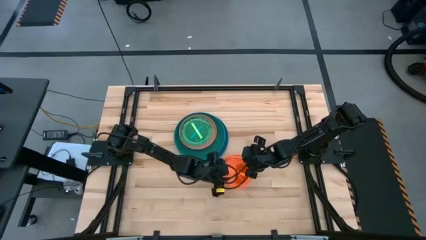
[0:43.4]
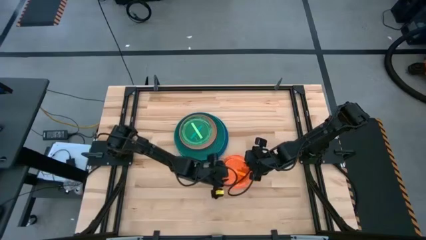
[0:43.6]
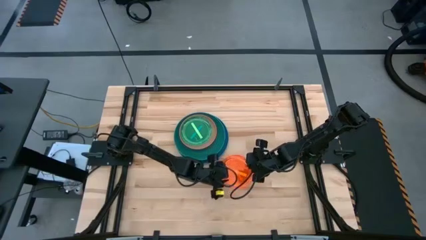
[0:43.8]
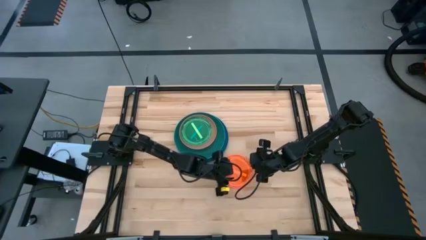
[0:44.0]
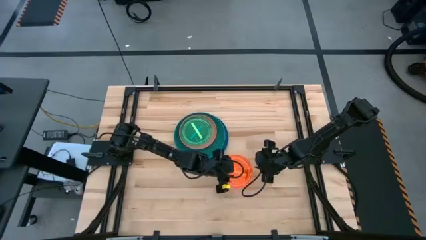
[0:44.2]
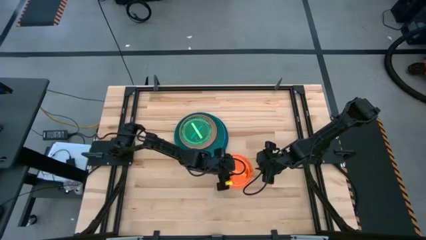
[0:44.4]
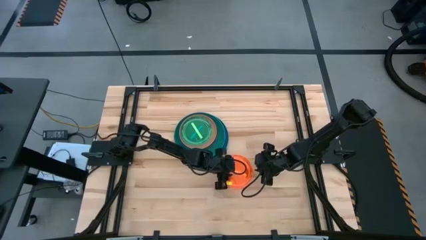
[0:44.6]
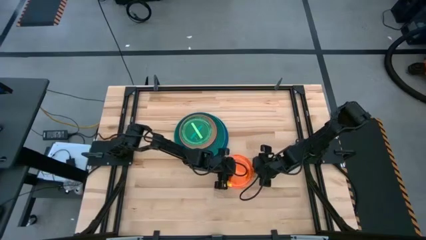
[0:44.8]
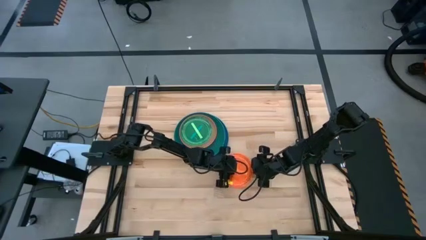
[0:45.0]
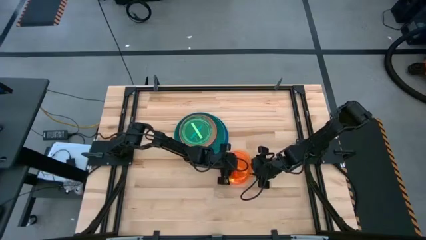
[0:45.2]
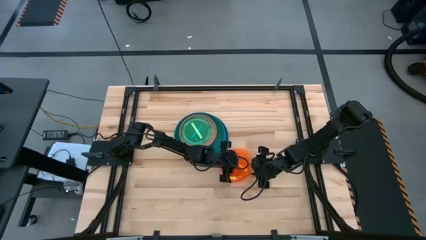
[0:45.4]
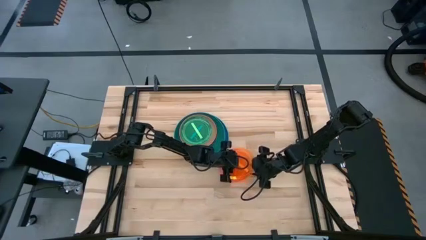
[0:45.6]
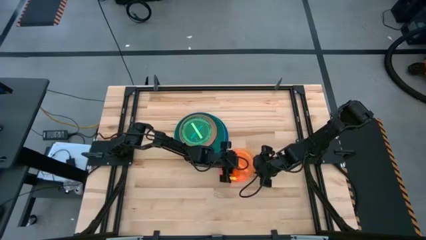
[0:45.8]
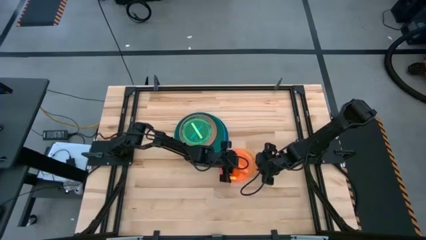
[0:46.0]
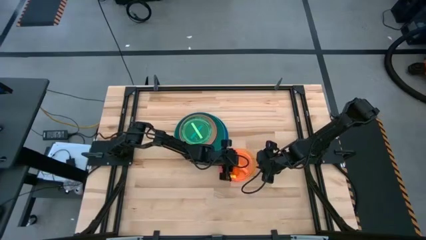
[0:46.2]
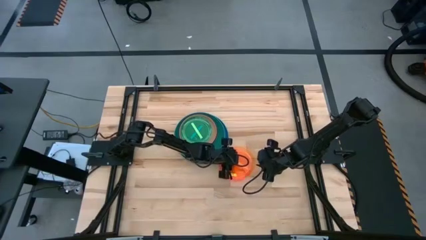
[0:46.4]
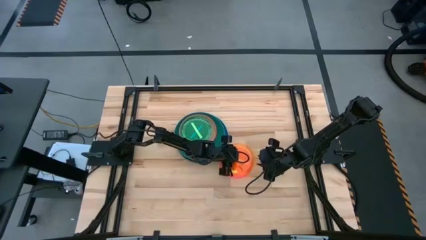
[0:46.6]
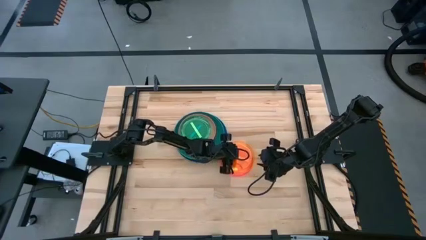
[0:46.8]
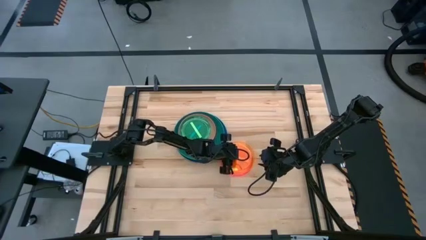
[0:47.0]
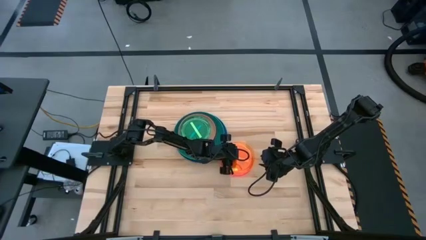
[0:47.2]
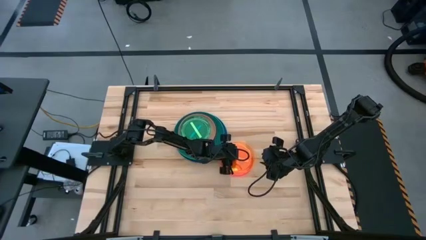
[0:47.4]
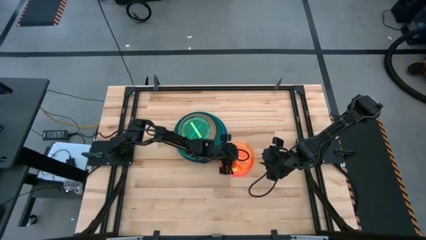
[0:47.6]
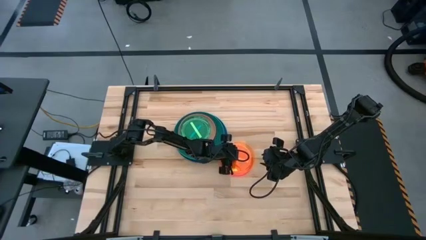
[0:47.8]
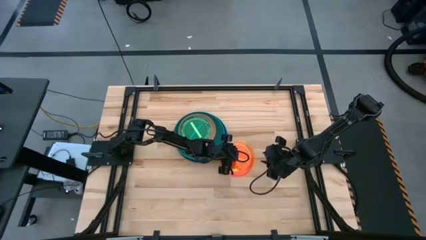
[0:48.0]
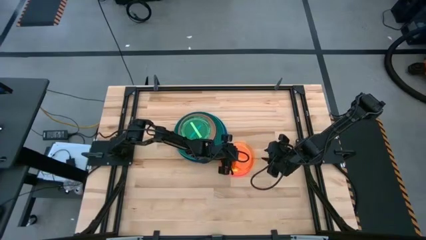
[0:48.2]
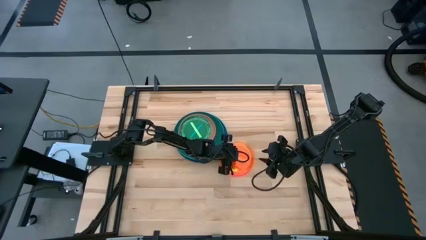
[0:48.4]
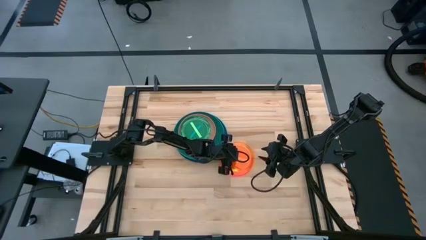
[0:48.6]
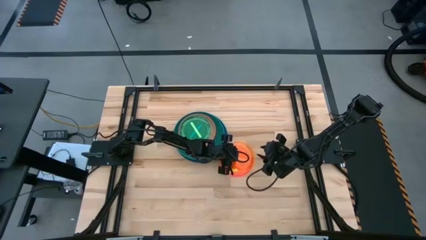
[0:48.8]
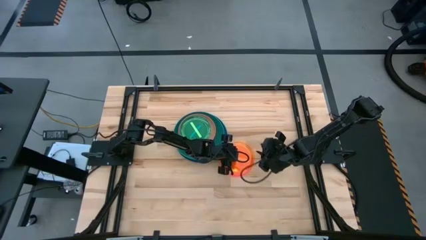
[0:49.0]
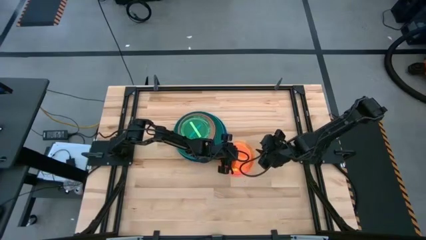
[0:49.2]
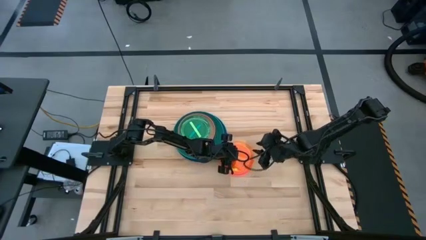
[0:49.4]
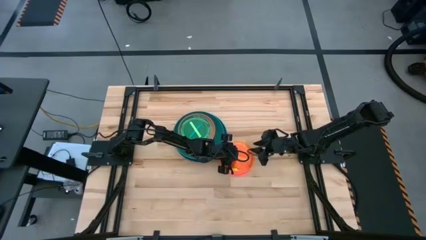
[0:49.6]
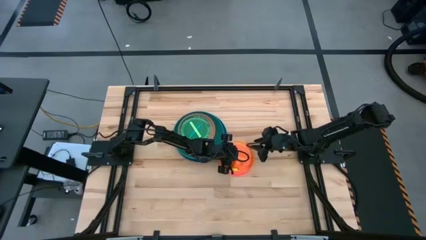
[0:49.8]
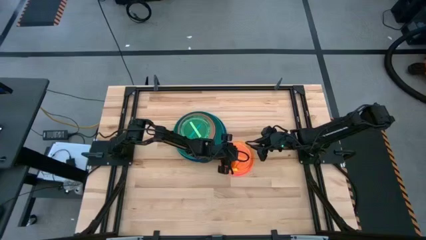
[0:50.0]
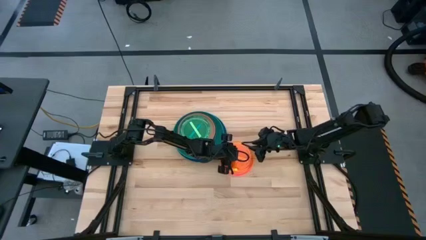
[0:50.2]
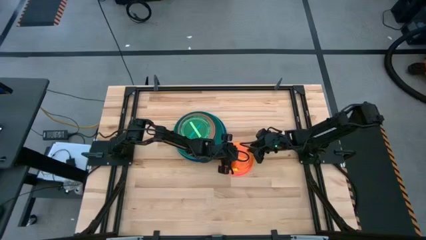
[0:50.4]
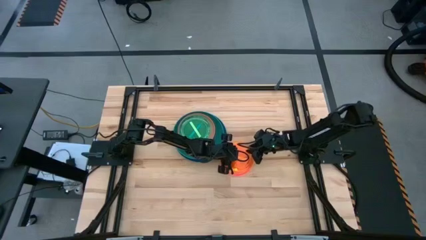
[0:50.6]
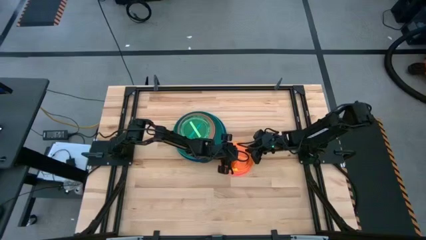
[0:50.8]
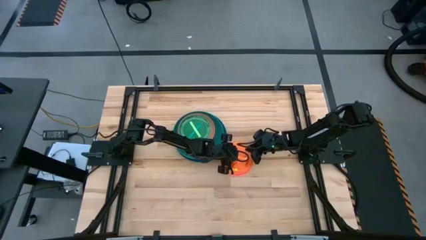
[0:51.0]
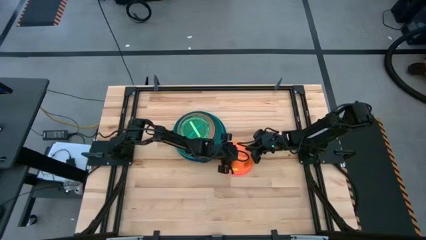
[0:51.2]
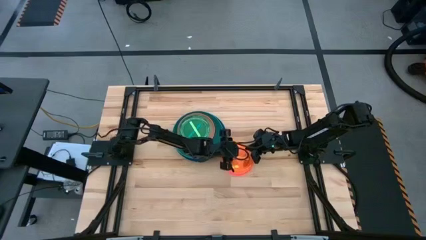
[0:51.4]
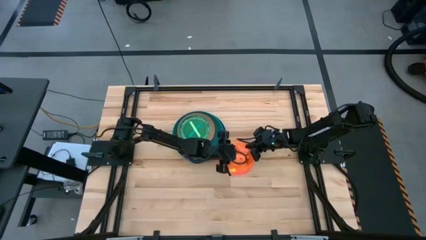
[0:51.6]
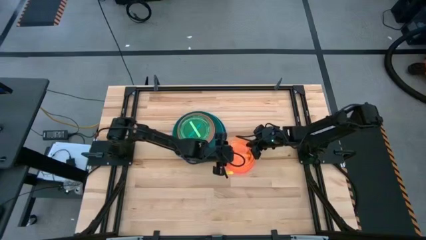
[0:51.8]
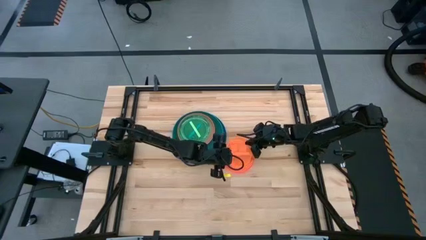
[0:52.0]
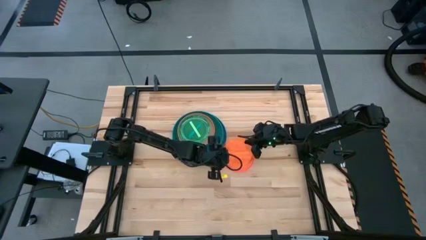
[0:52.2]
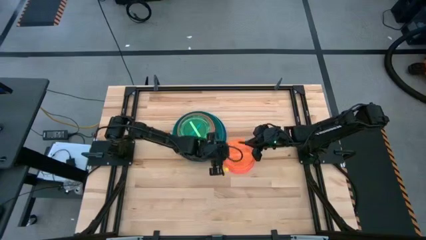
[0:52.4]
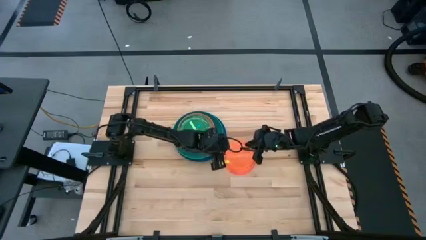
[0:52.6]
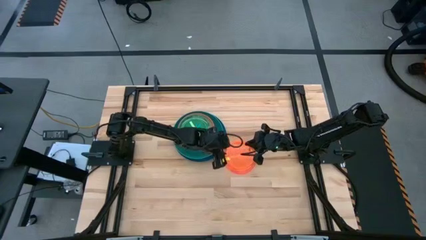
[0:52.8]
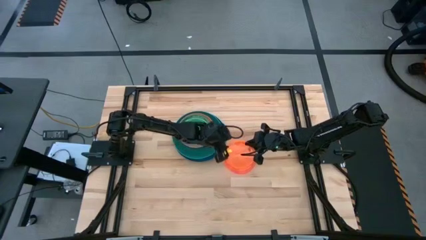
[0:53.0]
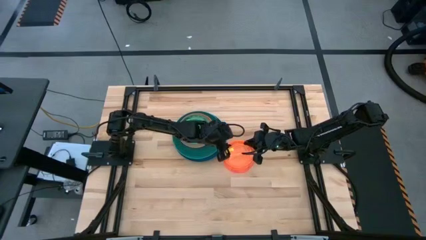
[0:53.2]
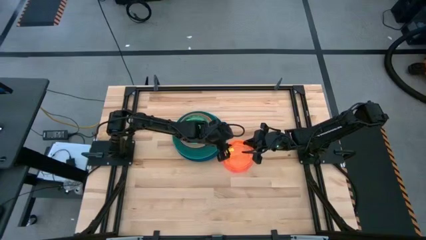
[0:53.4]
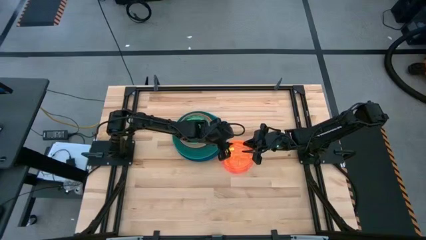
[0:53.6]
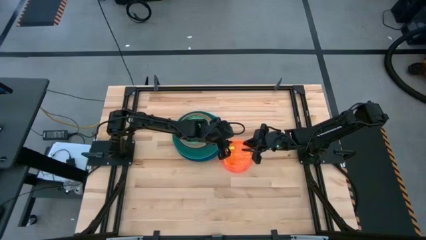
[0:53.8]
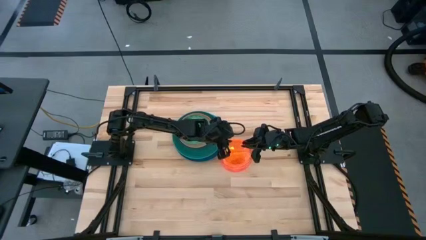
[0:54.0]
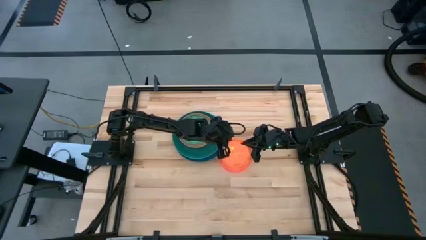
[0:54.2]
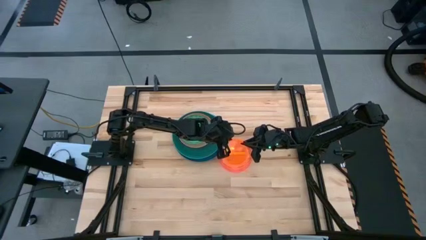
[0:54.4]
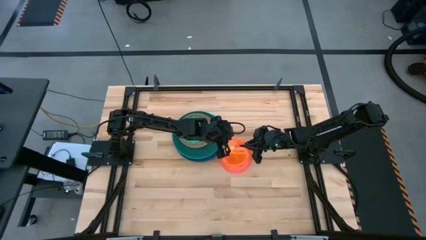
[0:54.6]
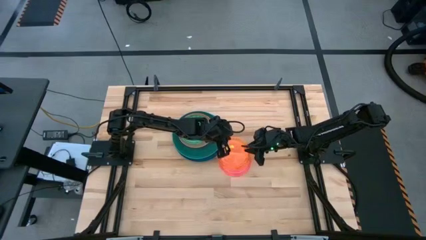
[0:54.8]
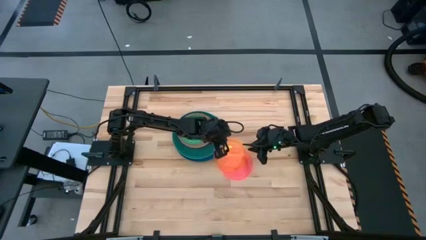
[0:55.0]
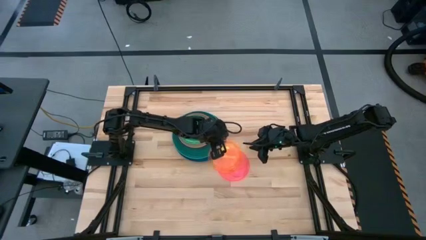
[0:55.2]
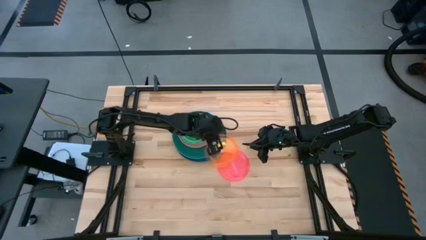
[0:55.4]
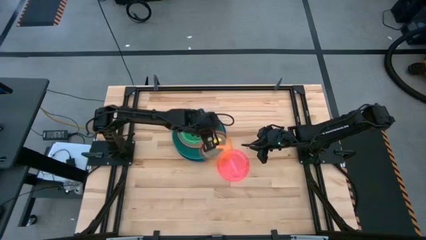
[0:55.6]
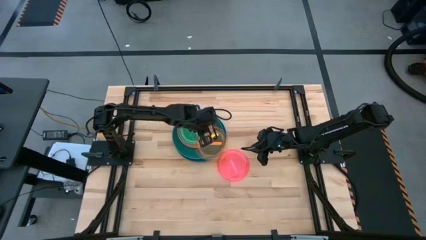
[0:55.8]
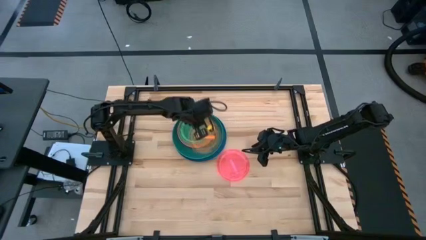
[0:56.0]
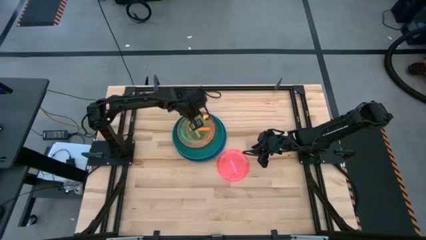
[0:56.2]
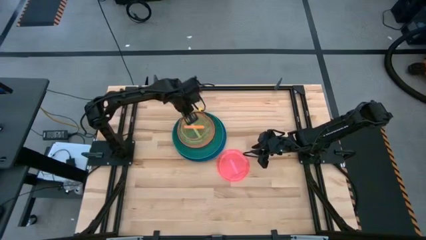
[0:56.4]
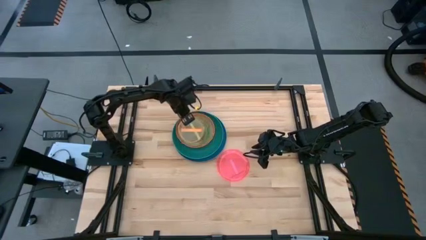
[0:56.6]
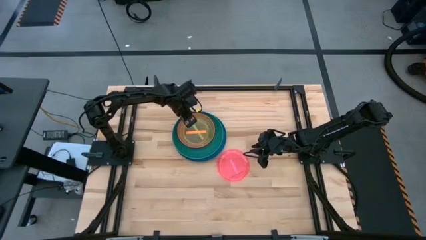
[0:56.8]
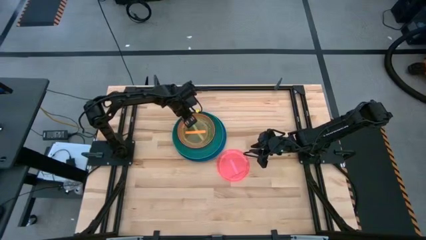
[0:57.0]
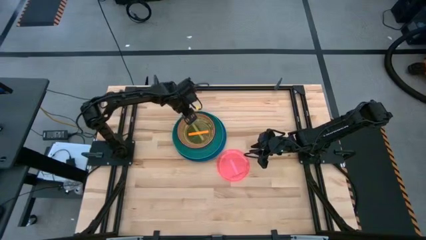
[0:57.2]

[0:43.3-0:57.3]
Task: Stack plastic plates
Stack the transparent orange plate on top of the transparent light-green plate

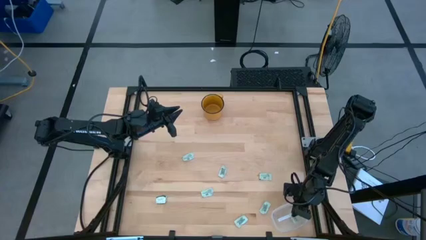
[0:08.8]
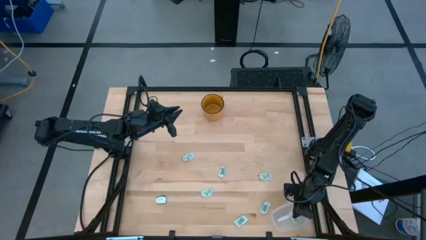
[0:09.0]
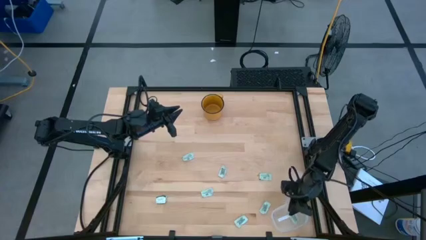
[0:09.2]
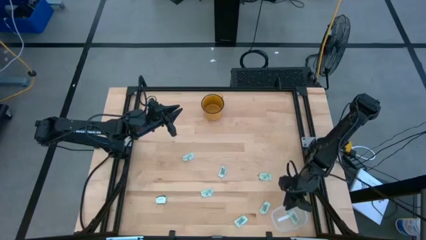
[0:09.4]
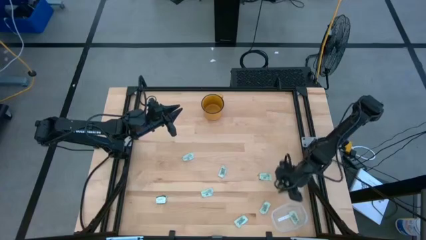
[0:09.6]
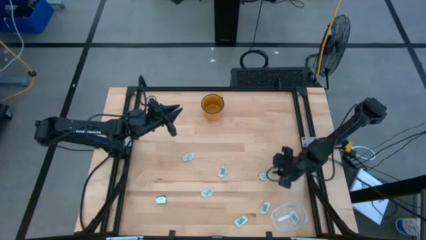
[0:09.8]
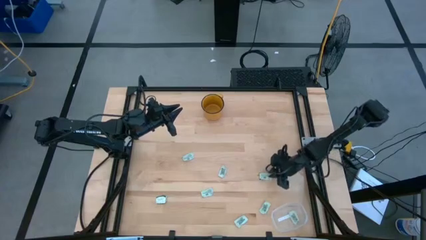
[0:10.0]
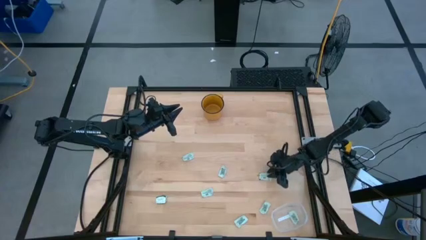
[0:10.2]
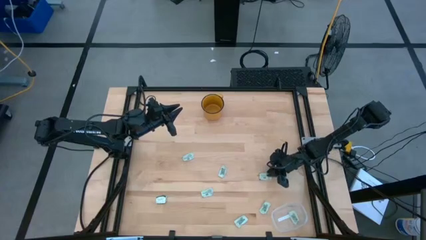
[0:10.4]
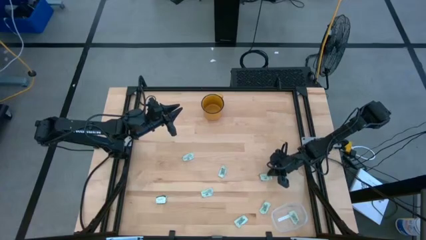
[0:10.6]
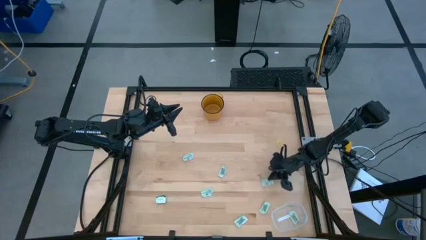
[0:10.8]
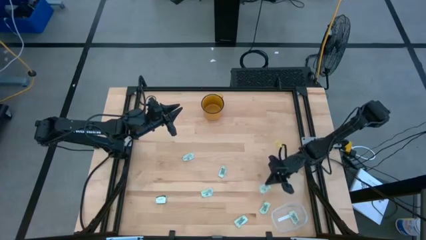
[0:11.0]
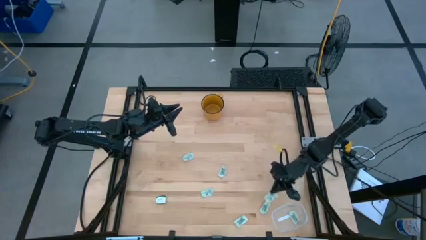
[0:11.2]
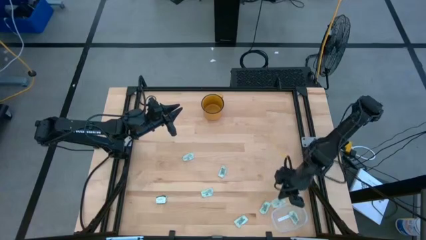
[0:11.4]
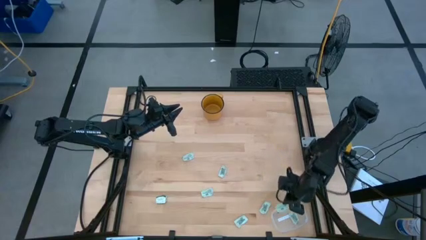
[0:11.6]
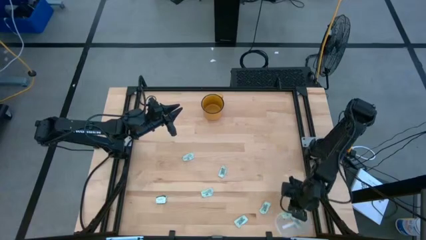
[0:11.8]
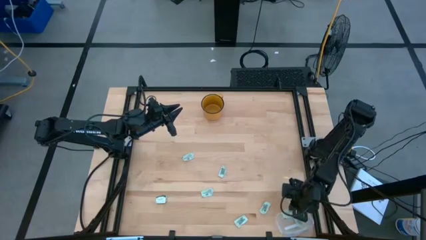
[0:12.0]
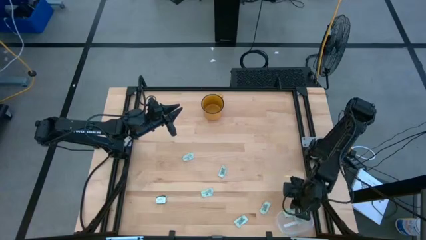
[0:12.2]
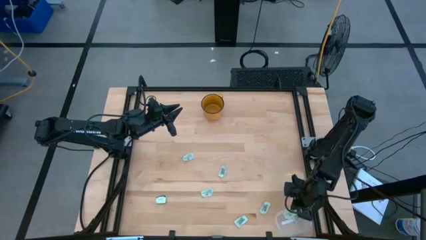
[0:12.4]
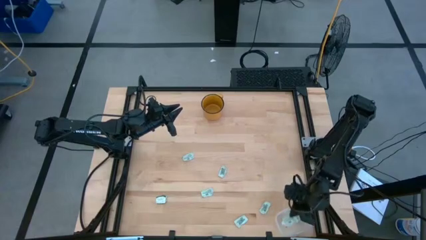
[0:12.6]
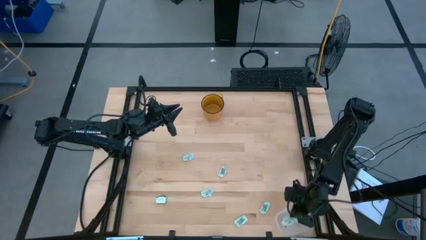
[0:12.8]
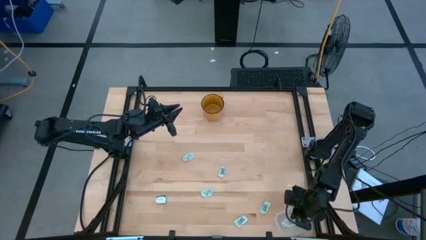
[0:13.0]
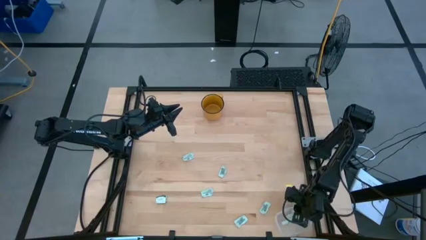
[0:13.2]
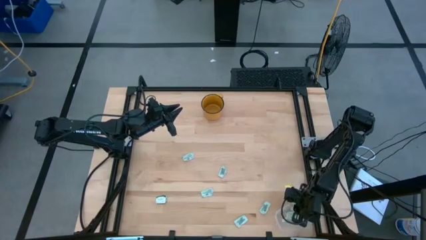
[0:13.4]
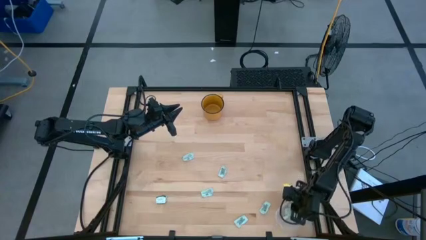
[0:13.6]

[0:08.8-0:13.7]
Task: Pick and place Stevia / Truvia into bins
Put the stevia packet into the transparent bin
